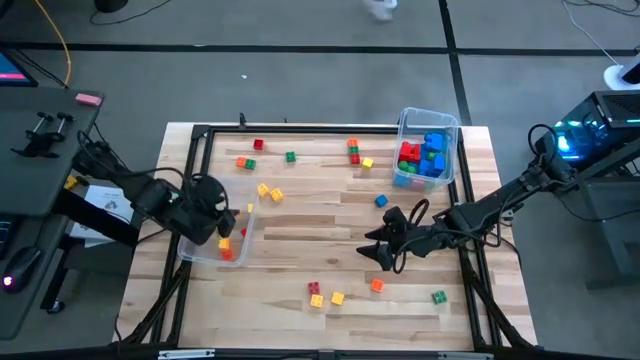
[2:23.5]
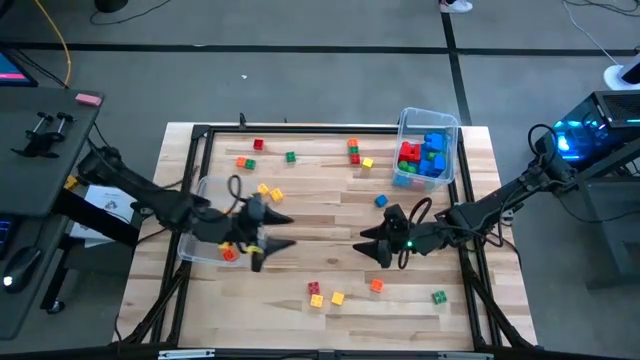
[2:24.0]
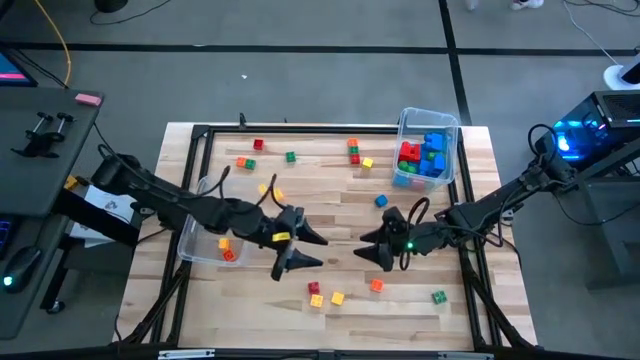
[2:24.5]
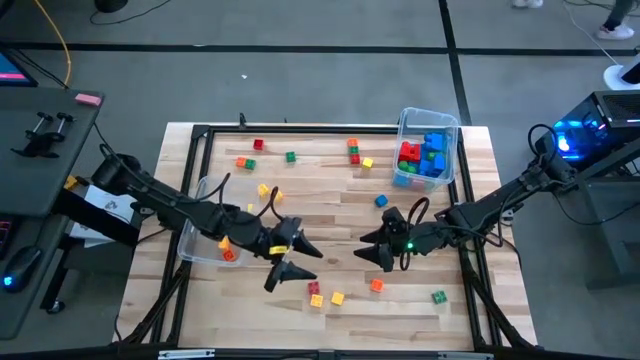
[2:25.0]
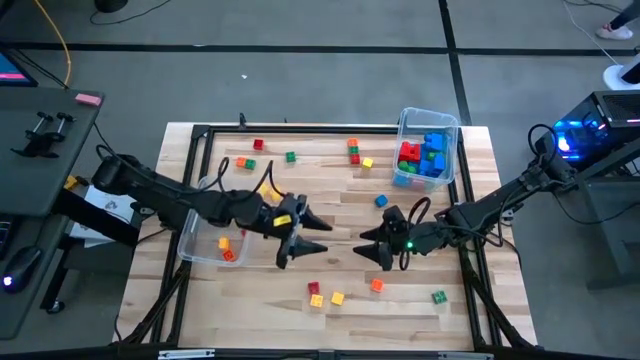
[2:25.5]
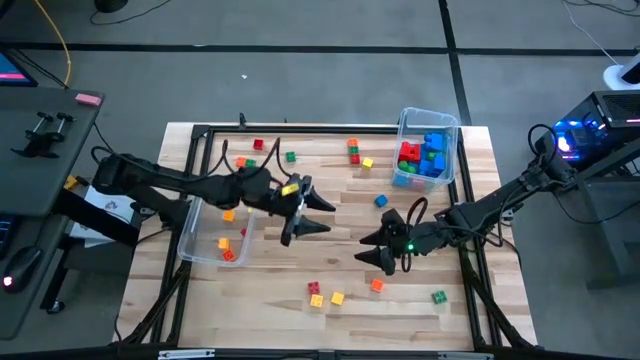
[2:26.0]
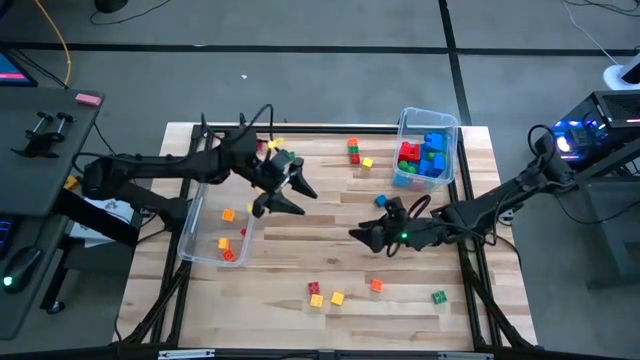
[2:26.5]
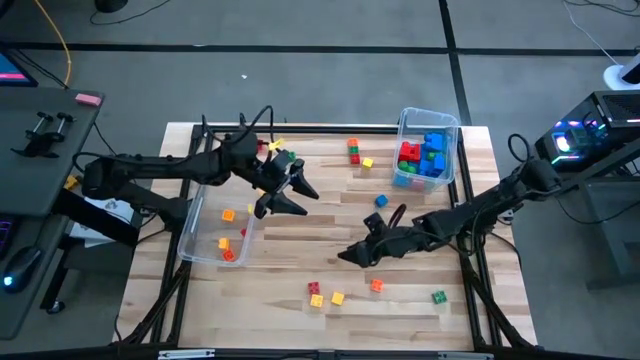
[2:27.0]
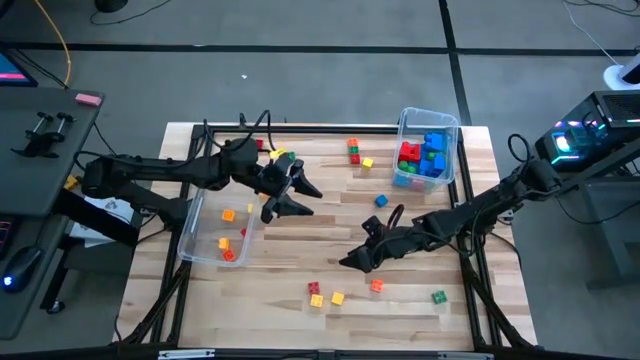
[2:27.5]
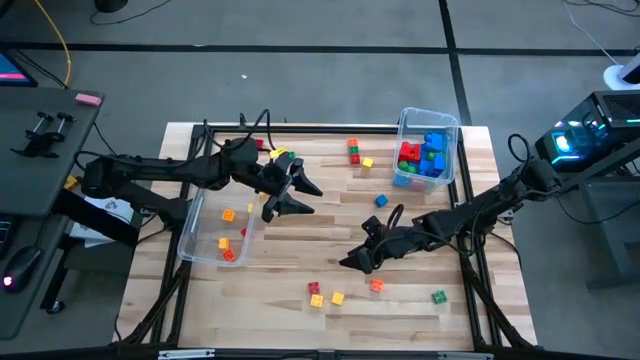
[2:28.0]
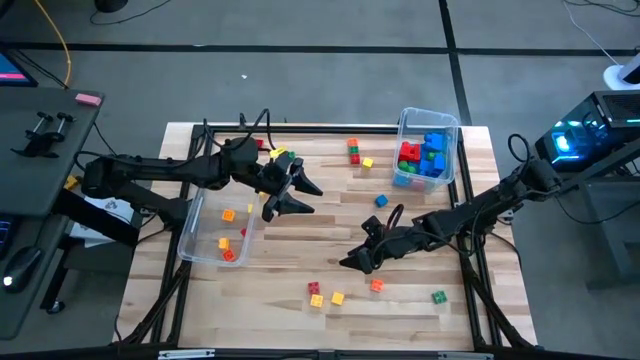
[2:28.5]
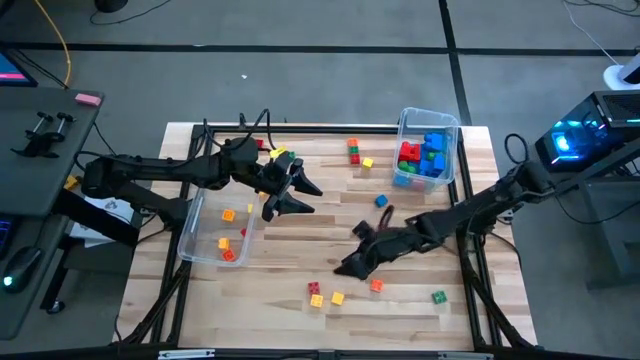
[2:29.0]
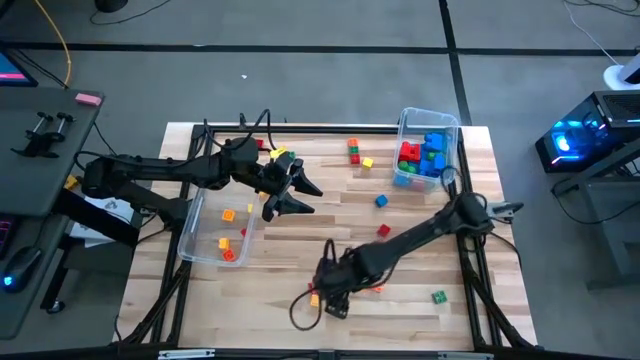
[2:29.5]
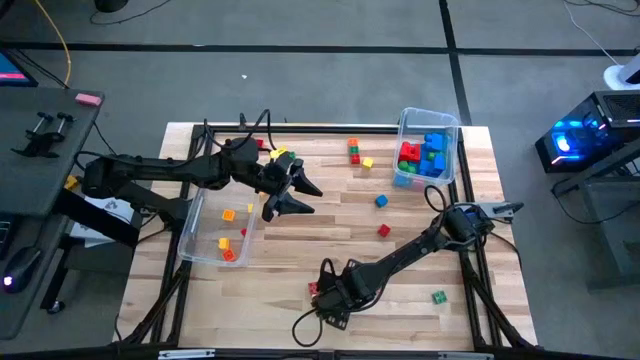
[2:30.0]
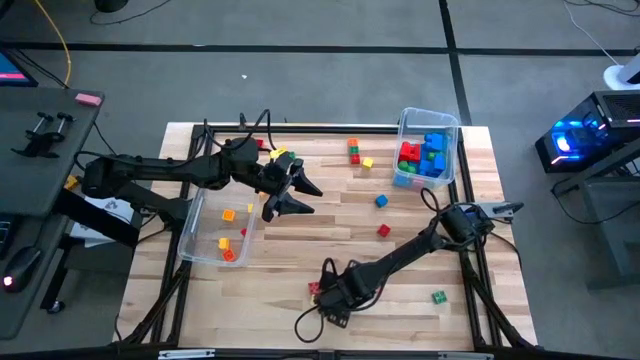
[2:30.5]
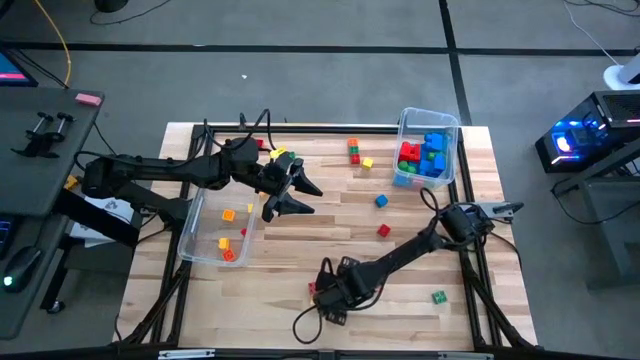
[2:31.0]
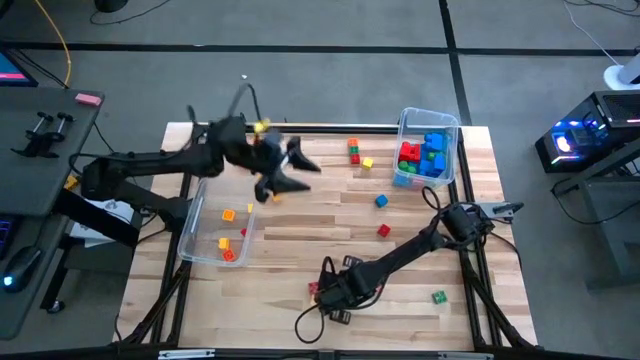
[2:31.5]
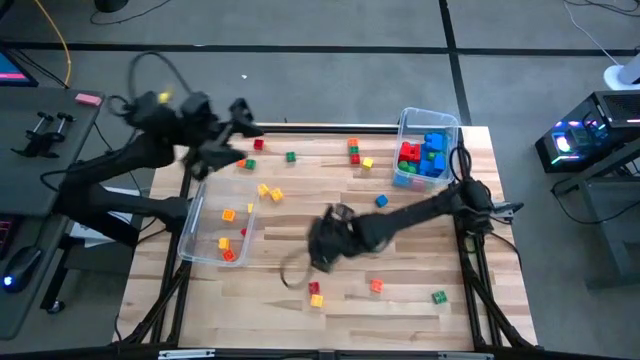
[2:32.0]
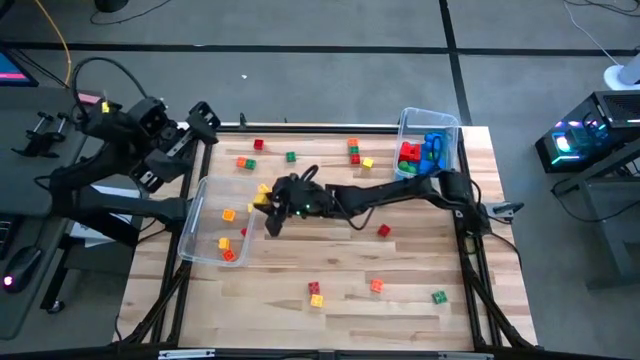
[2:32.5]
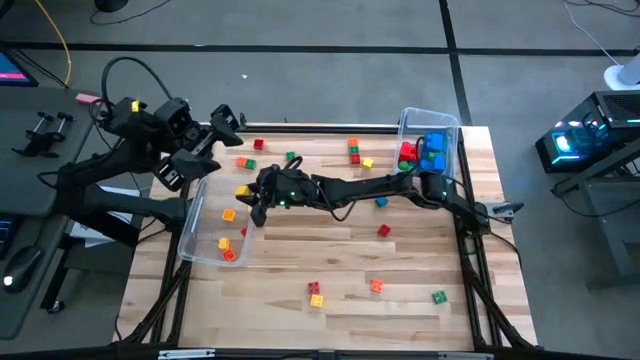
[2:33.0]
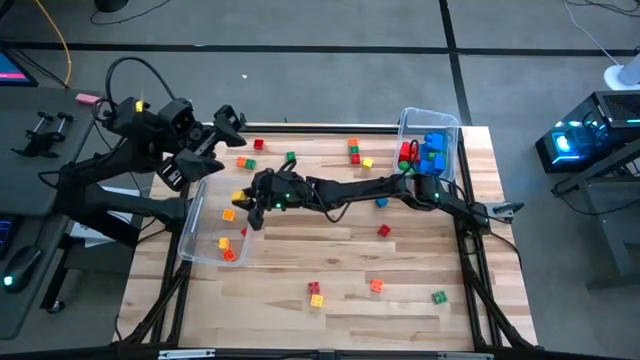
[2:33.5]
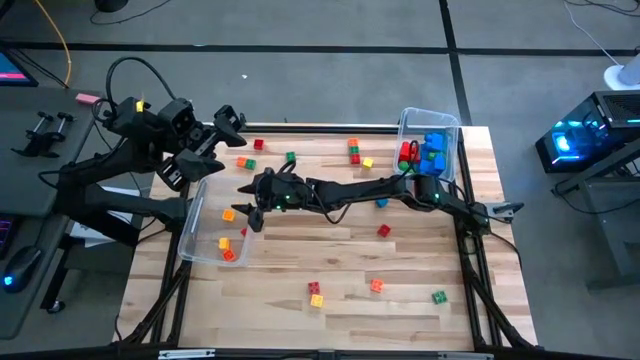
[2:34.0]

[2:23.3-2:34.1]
Task: Sort blocks by size
Put the small yellow block into the left transparent bin

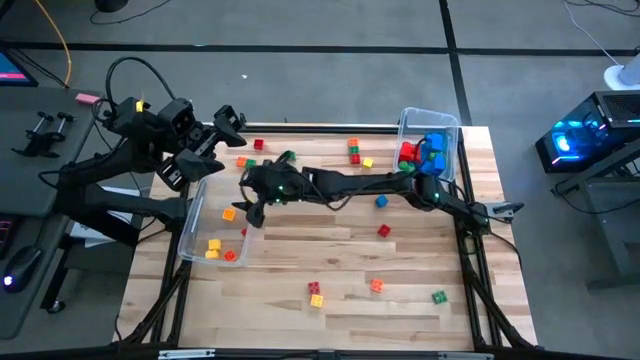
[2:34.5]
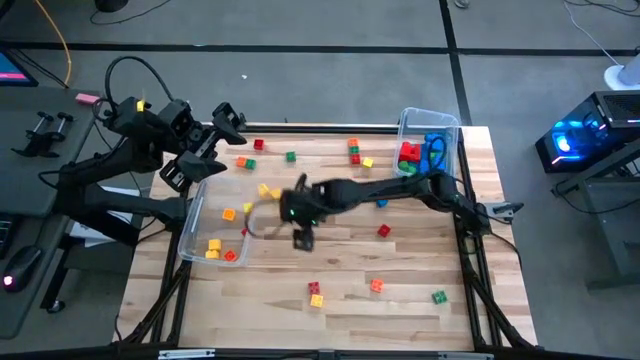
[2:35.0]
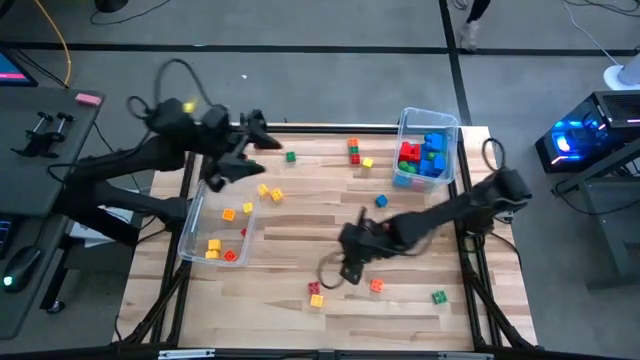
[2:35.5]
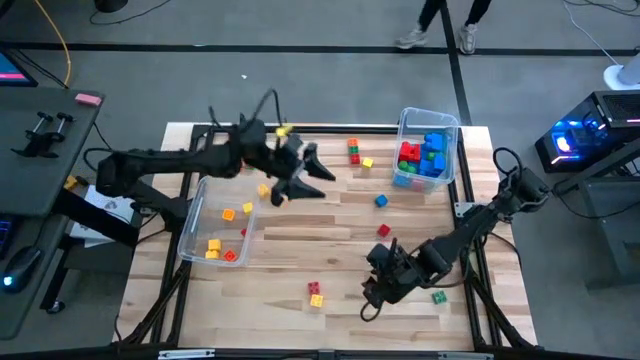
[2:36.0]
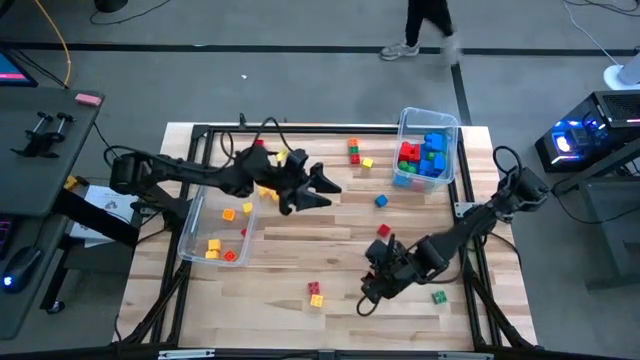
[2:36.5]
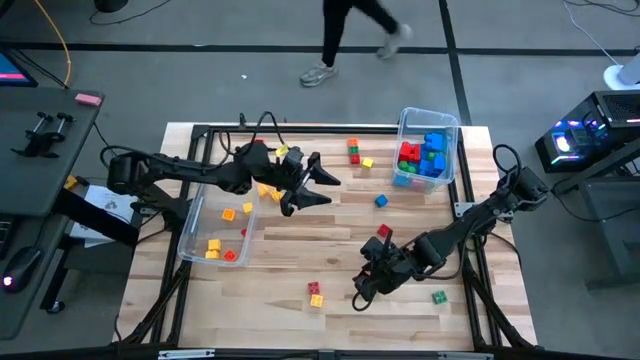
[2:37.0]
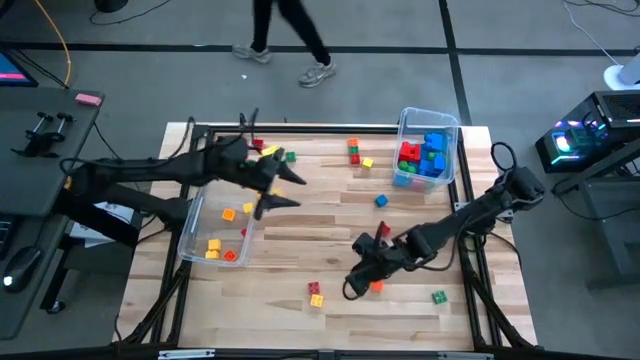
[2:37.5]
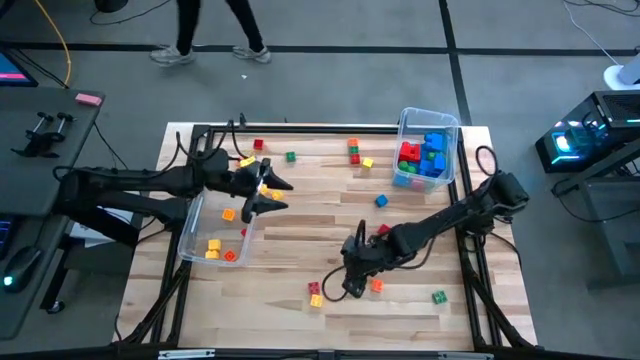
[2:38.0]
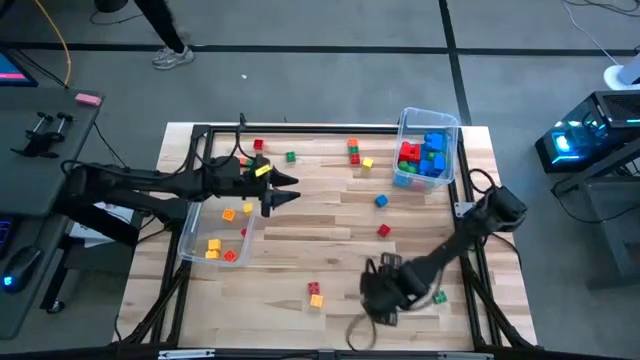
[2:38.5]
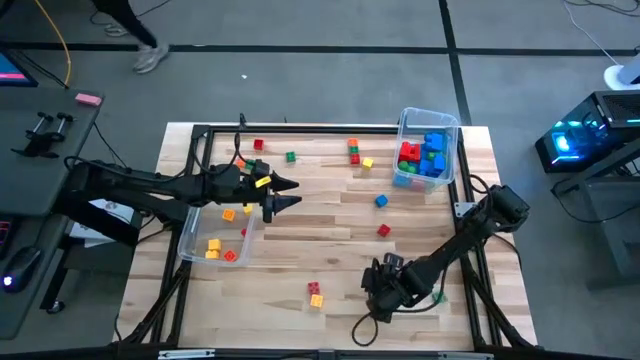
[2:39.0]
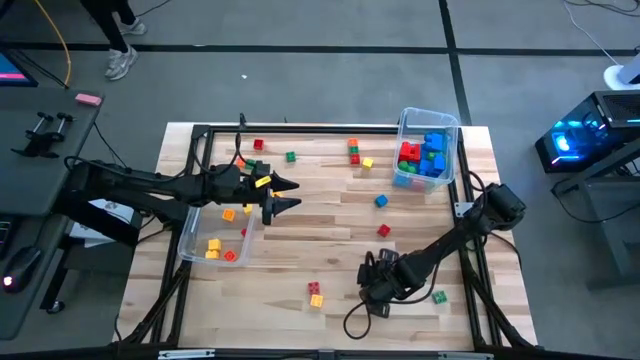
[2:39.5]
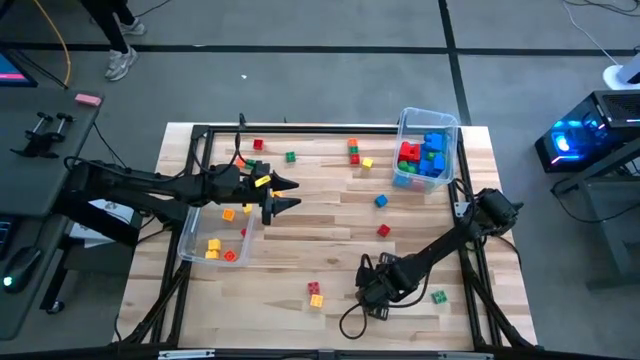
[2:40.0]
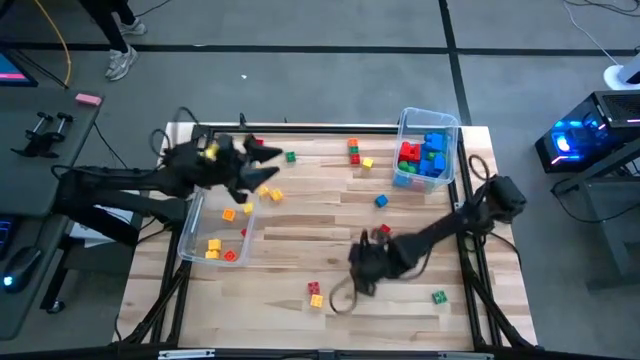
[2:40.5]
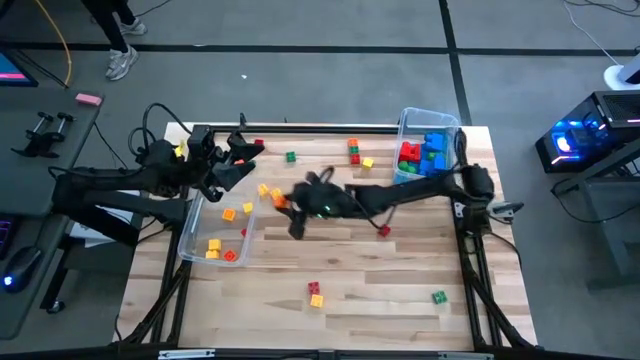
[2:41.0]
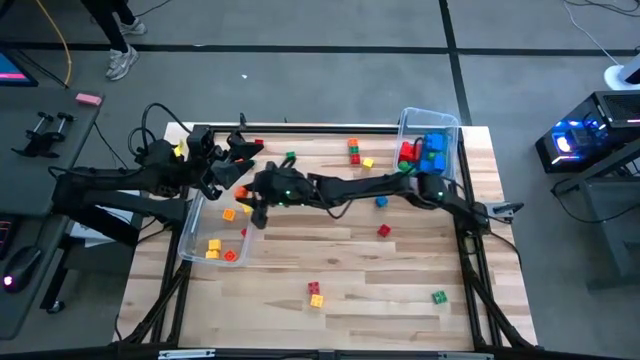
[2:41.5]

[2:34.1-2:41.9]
Put the small orange game piece into the left transparent bin

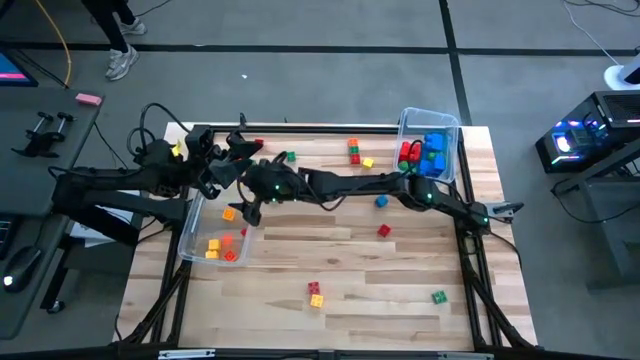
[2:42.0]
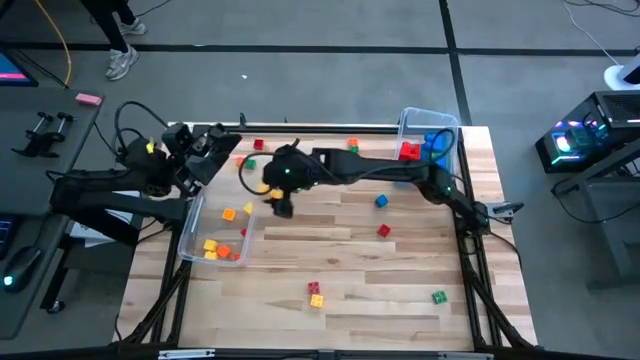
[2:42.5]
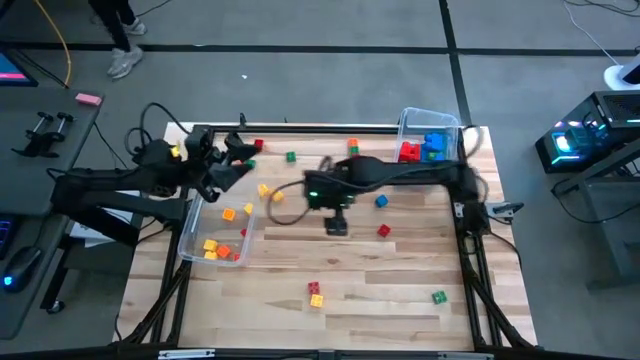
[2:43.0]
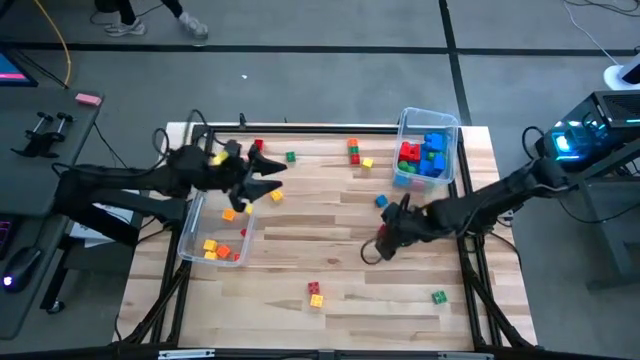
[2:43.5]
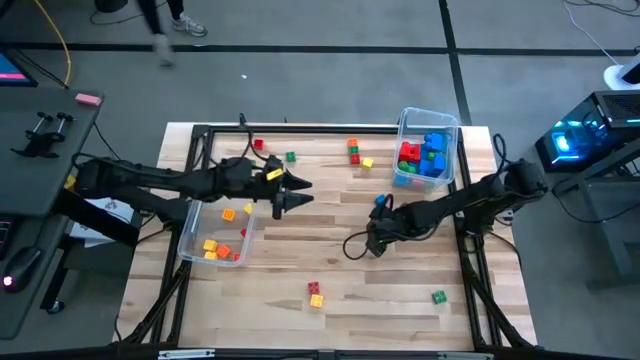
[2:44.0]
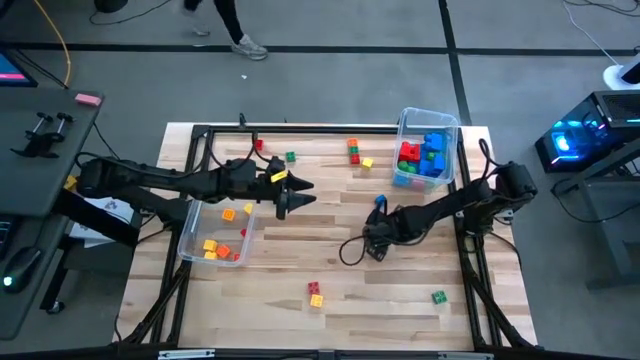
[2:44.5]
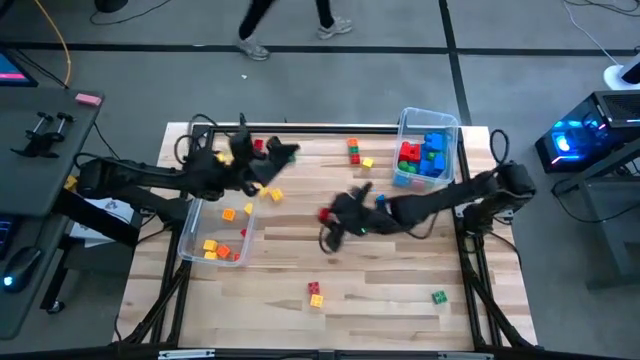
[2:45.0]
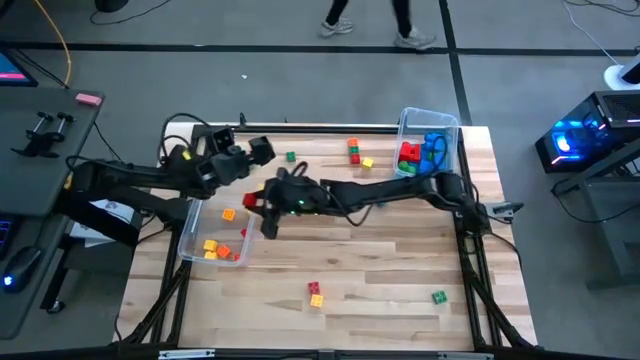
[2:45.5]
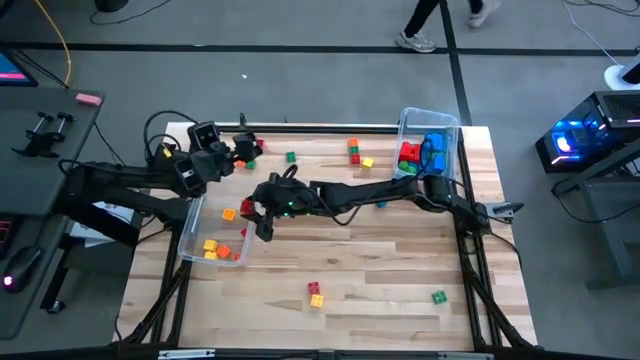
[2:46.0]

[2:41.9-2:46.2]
Put the small red game piece into the left transparent bin
